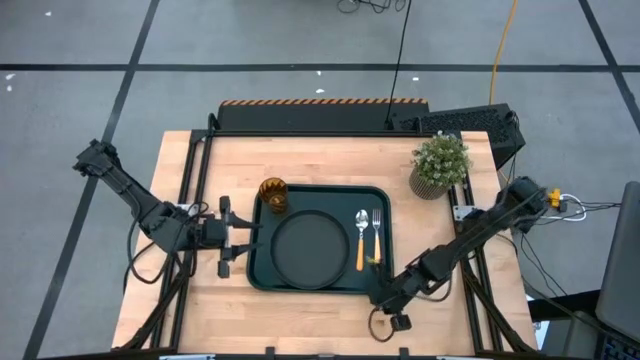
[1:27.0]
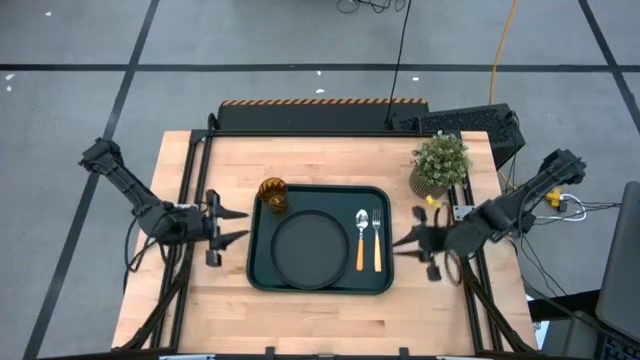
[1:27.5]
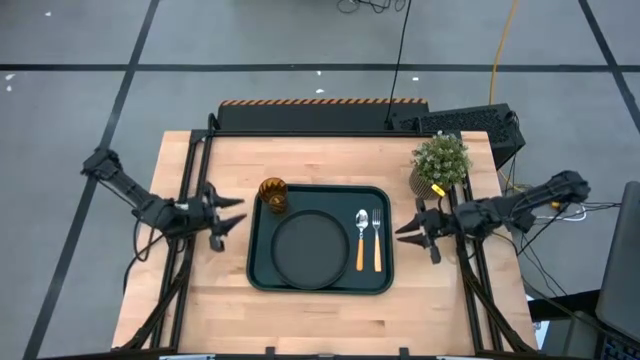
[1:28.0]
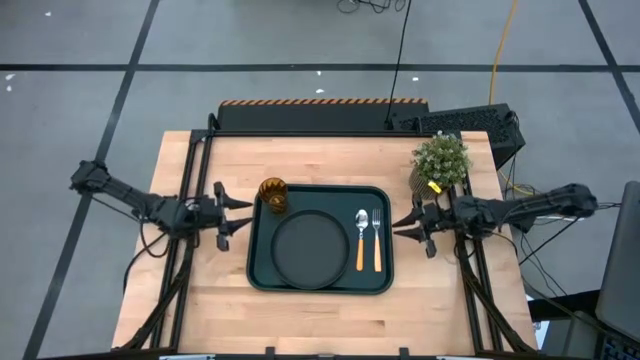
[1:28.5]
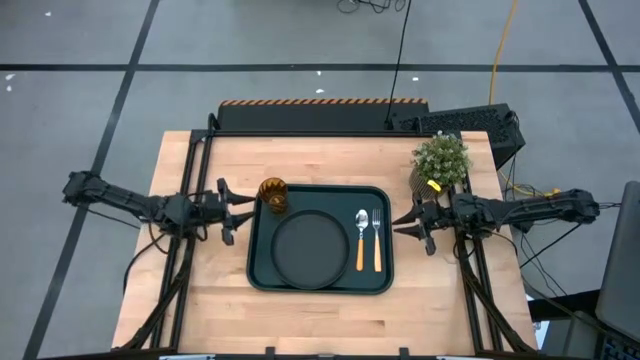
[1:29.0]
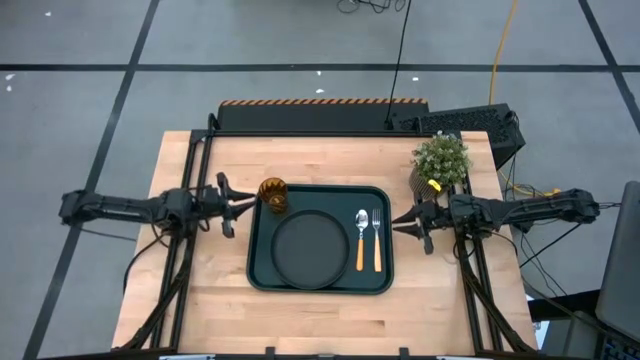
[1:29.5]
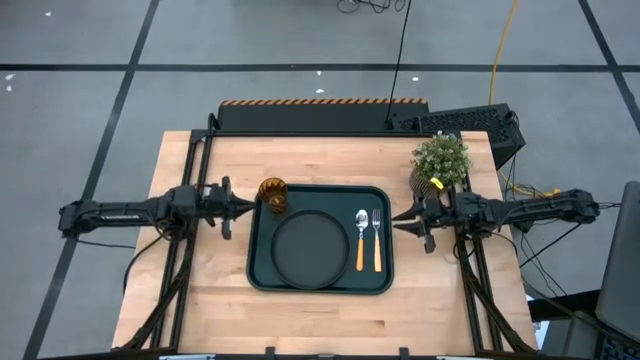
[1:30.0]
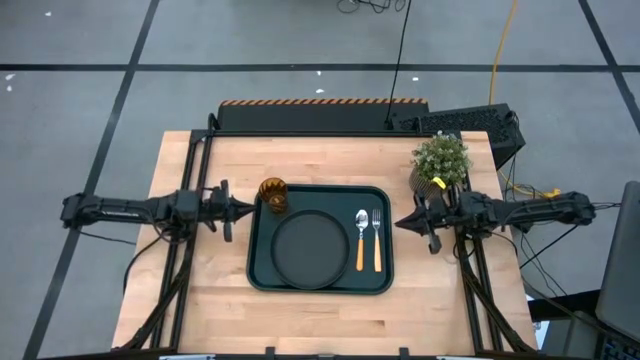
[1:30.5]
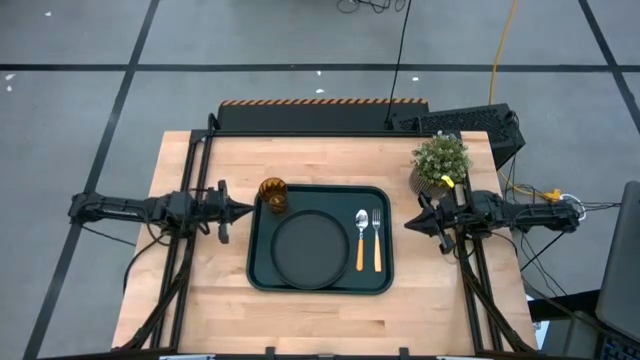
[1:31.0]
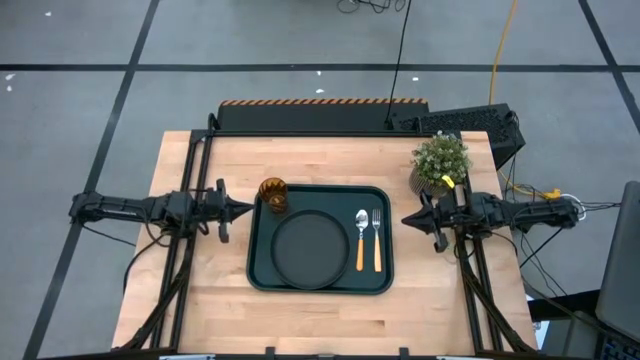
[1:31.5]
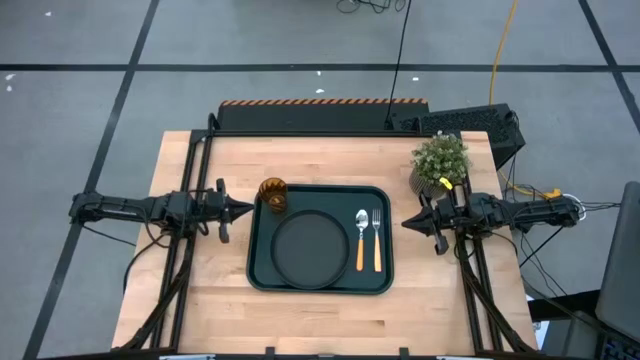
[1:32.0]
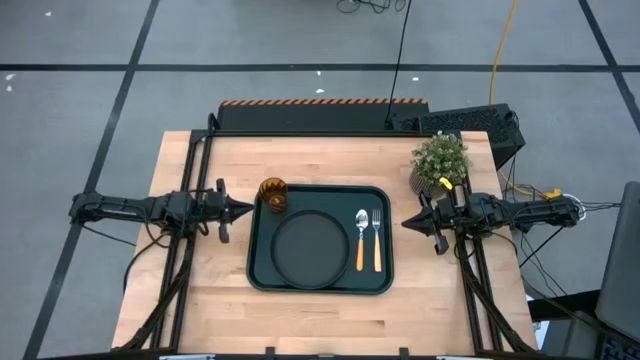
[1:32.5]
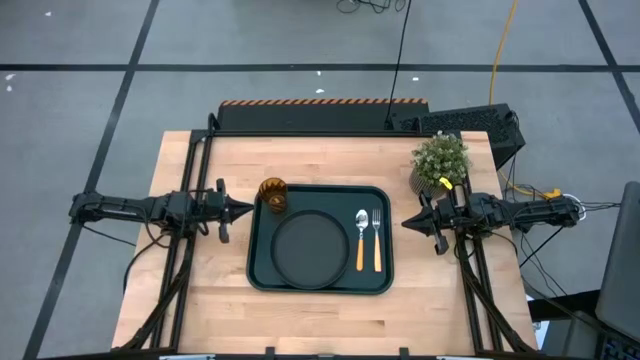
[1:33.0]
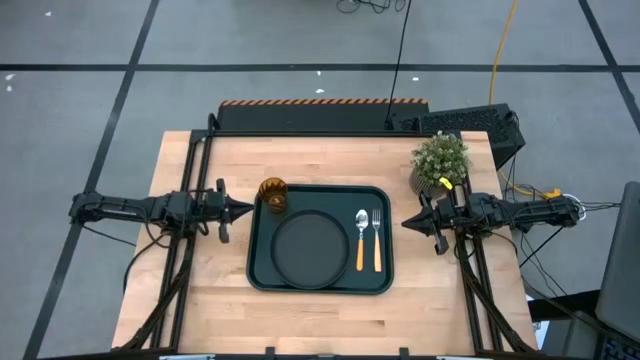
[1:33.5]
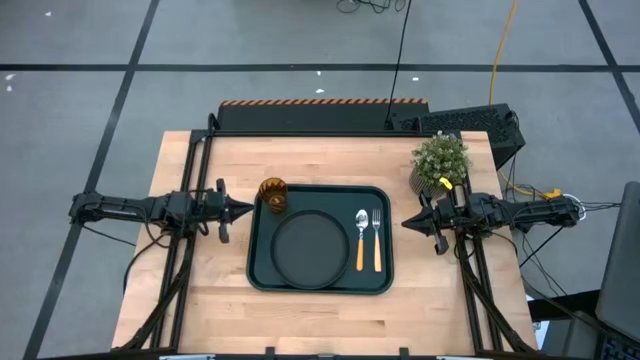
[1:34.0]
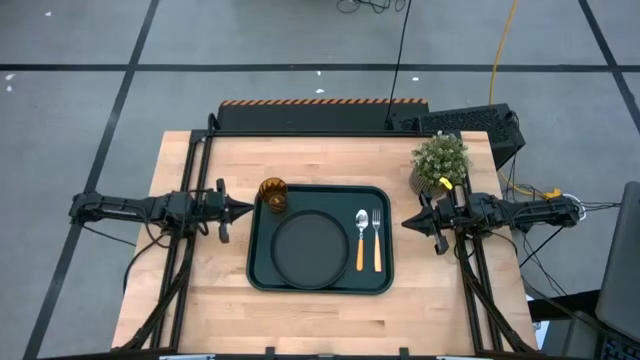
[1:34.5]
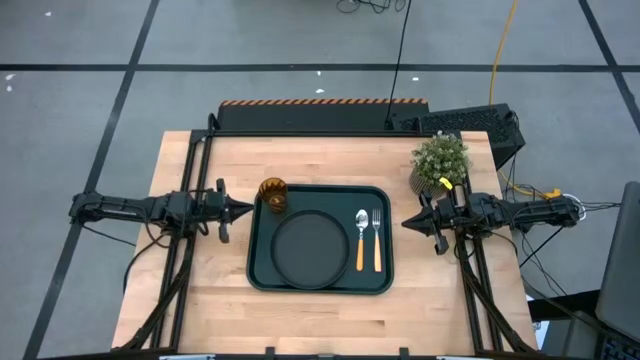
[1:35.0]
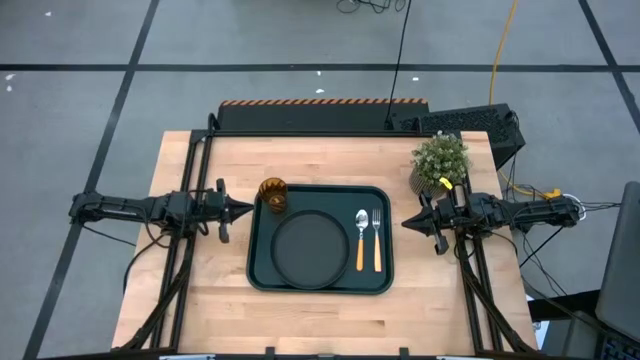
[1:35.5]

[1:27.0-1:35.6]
Task: Pick and place plate/cup/fork/spoon on tray
Return to Home Position

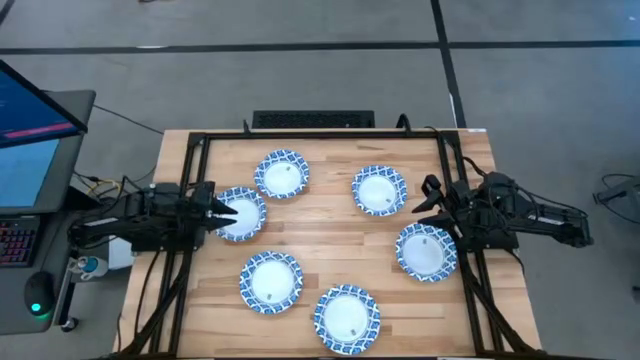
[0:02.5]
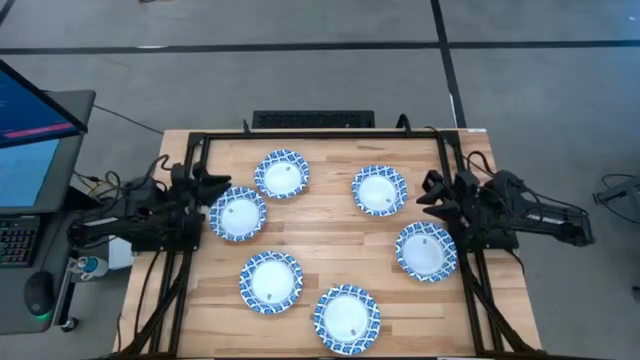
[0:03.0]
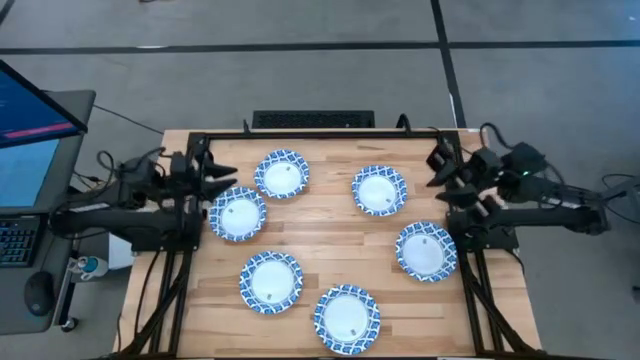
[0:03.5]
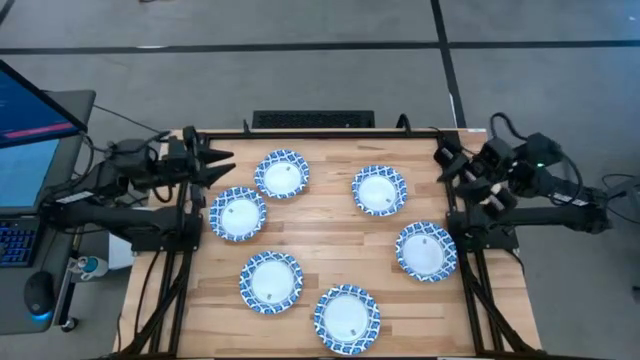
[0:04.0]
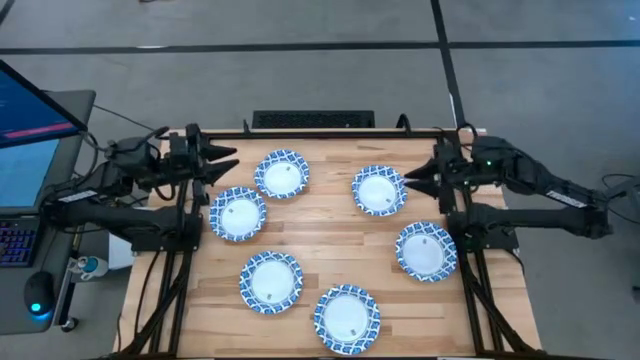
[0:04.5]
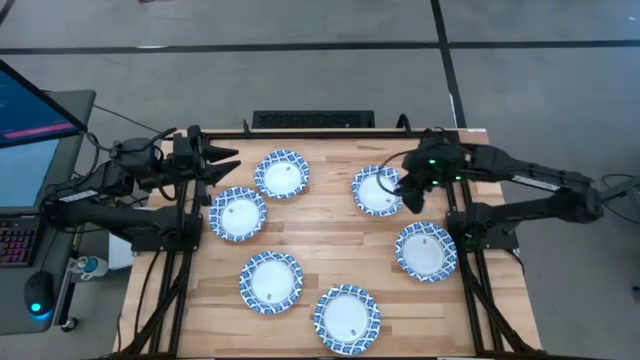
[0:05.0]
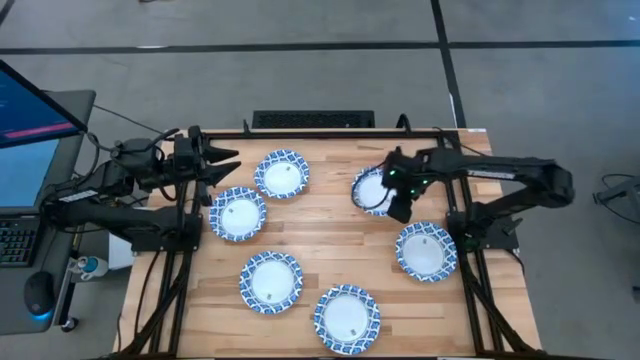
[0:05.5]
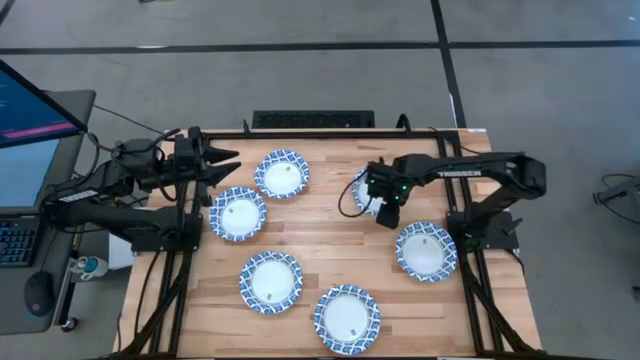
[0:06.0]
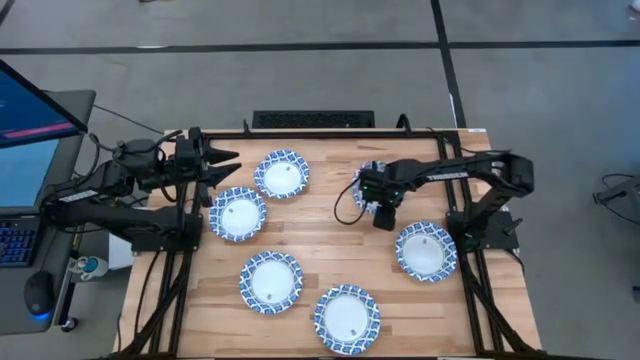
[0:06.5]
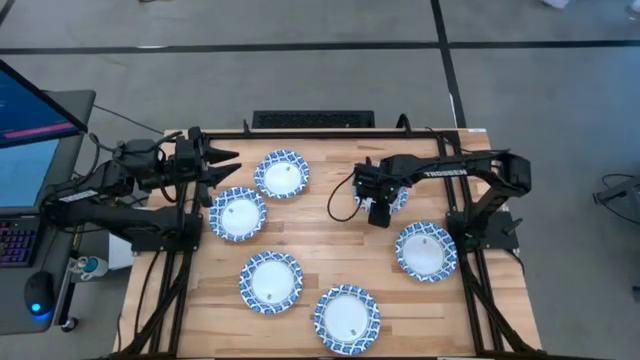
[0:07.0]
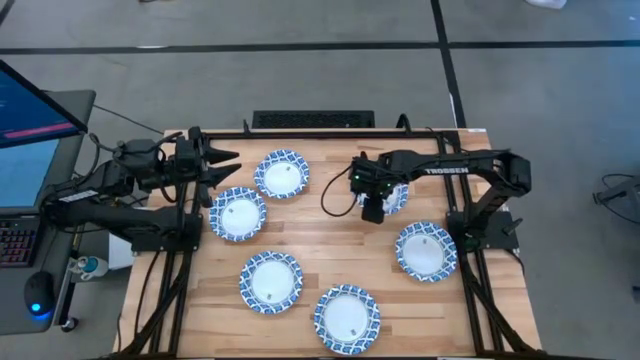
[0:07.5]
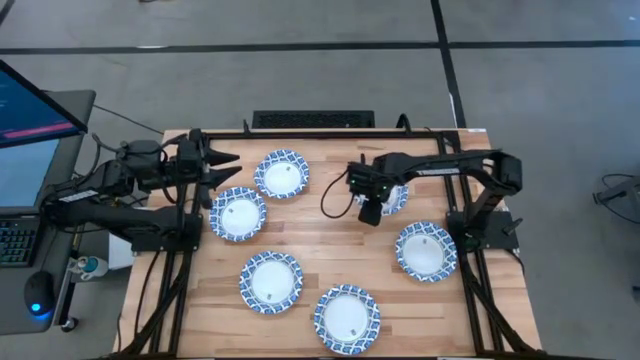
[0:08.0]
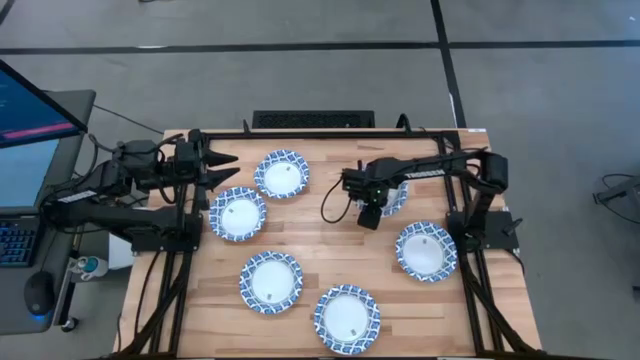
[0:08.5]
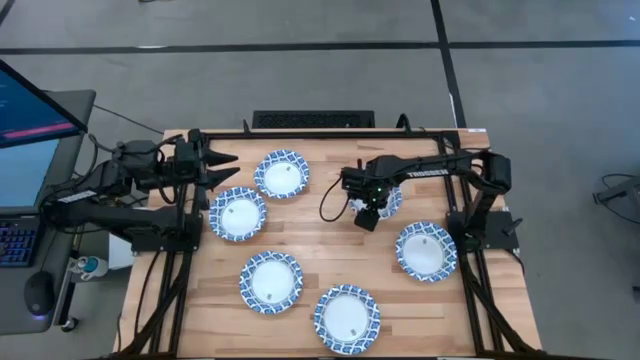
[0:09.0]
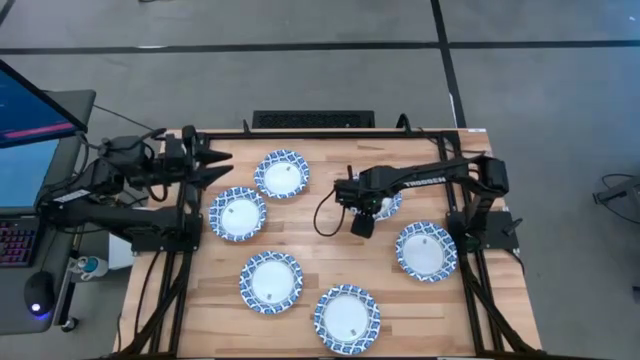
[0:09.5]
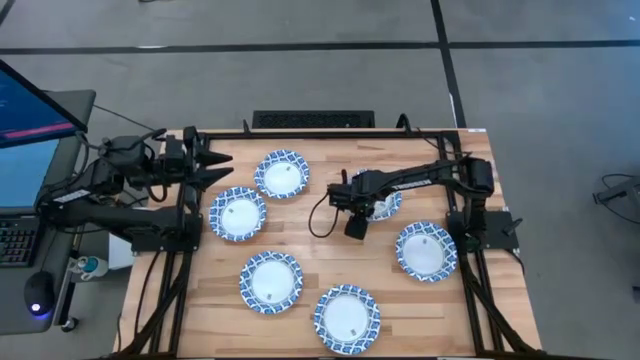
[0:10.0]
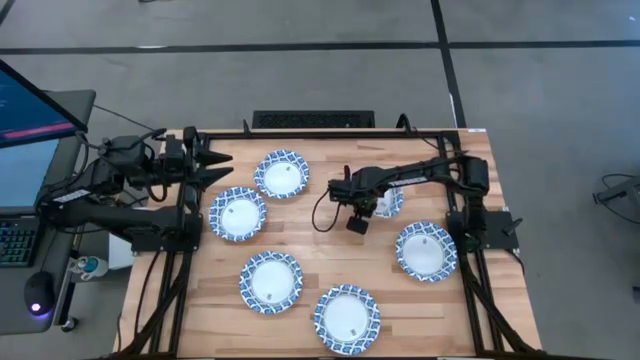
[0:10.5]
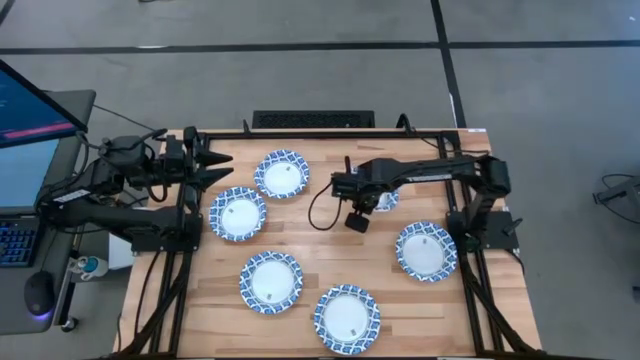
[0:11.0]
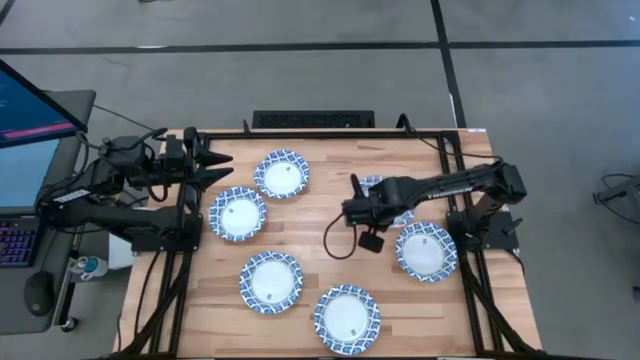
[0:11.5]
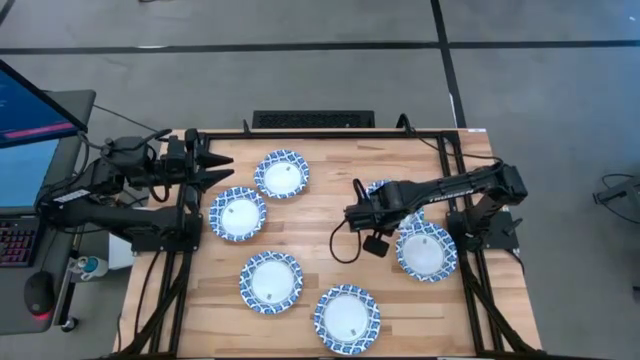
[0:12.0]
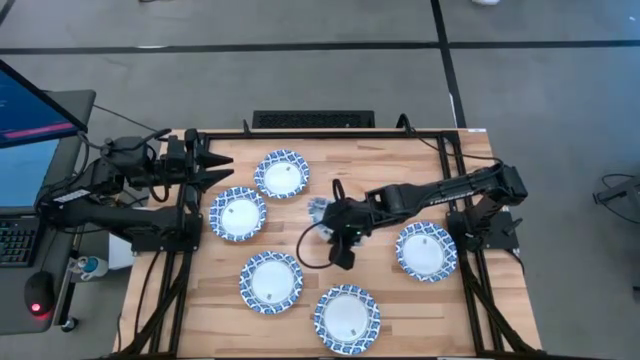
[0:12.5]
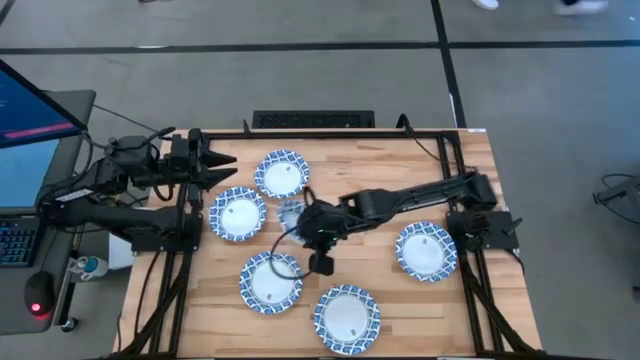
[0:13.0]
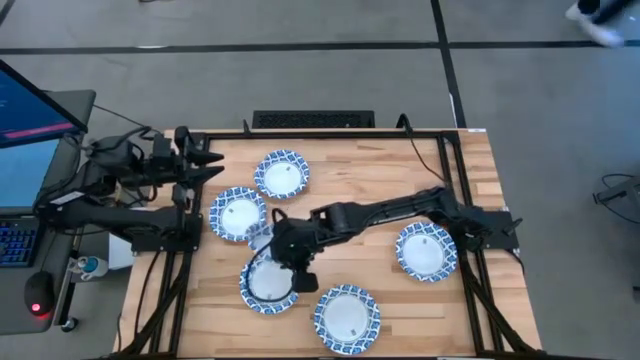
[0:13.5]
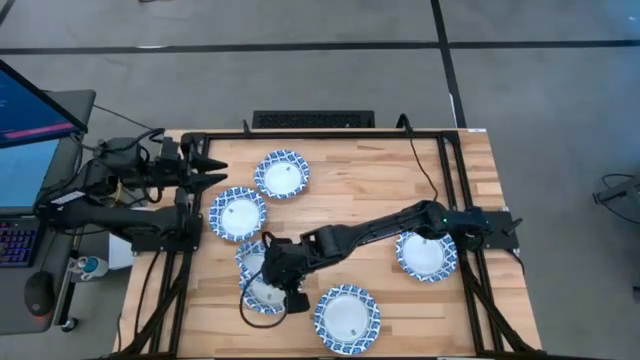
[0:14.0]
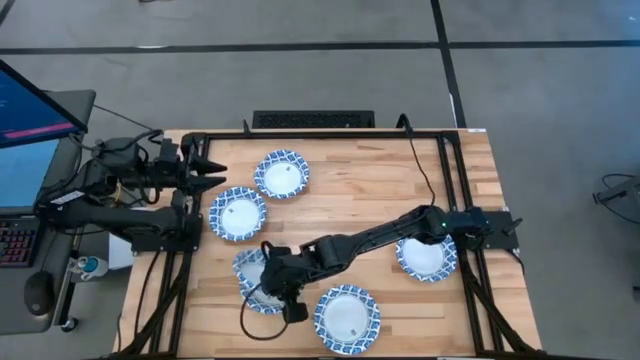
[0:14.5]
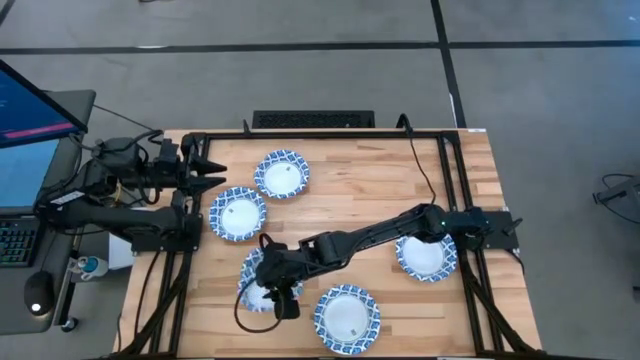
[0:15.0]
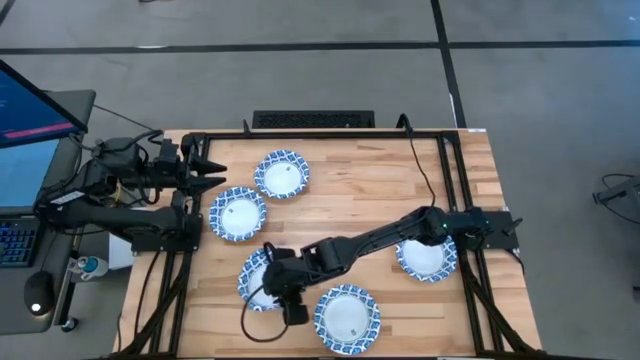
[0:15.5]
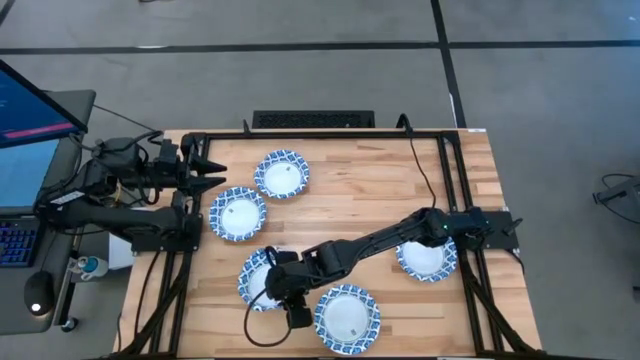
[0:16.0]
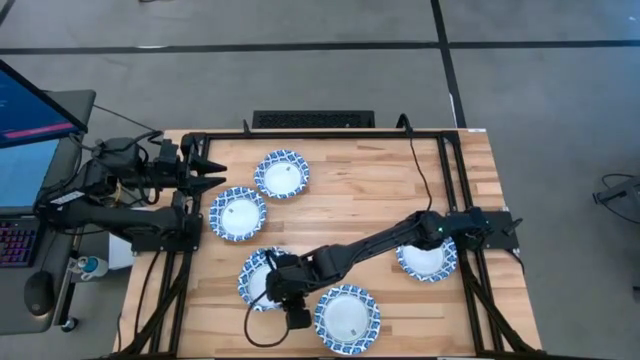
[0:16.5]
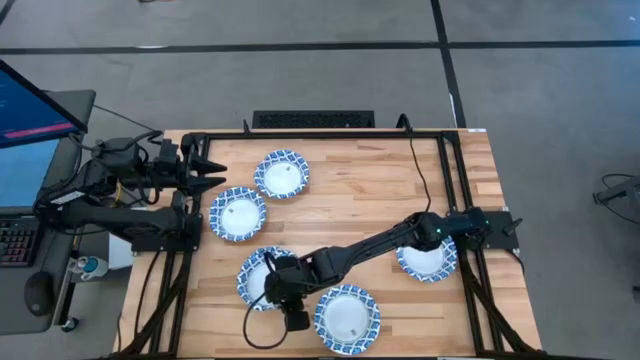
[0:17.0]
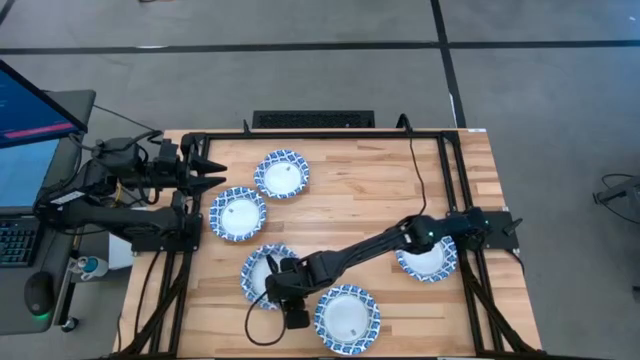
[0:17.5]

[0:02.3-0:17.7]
Task: Nest bowls inside each other
Stack the blue patterned bowl on the blue bowl
